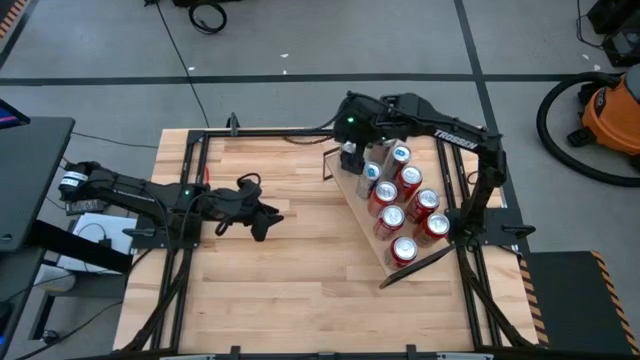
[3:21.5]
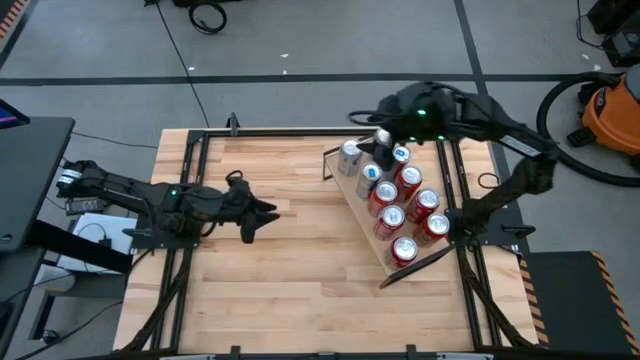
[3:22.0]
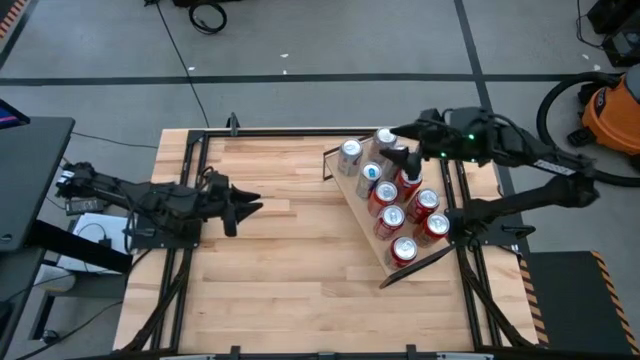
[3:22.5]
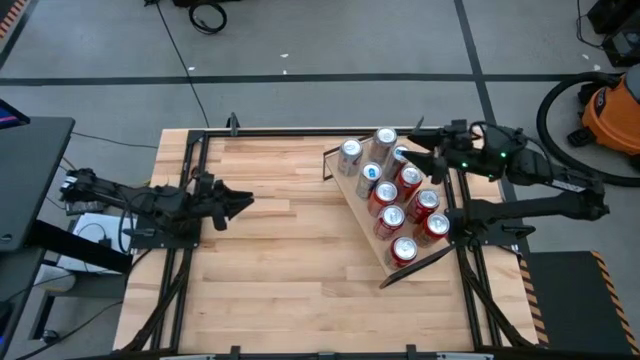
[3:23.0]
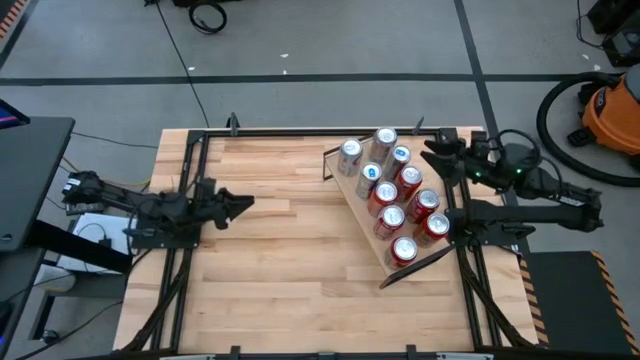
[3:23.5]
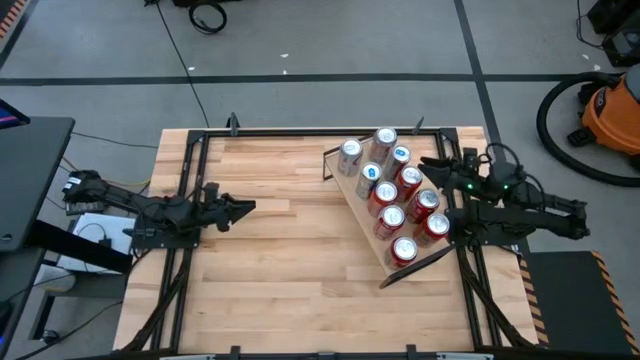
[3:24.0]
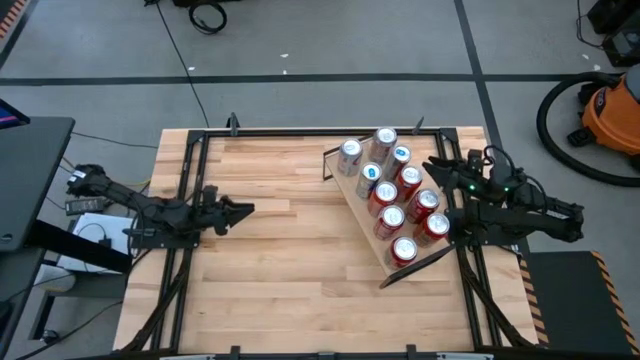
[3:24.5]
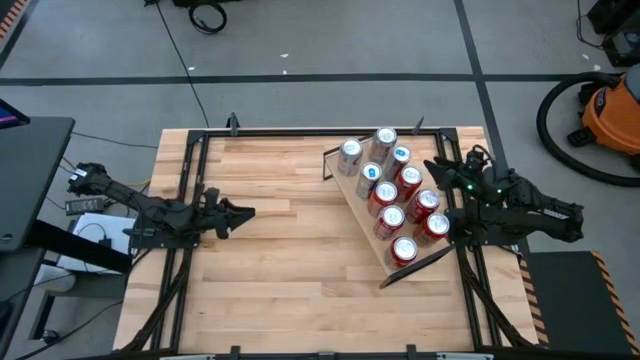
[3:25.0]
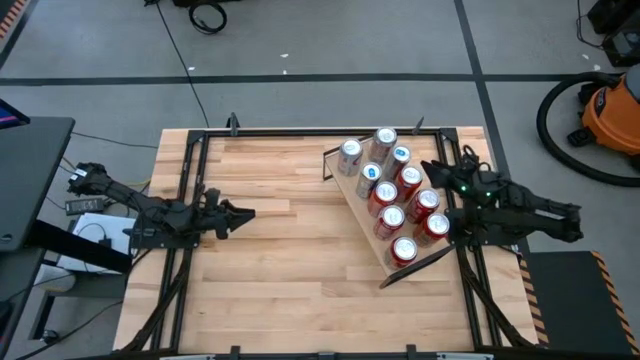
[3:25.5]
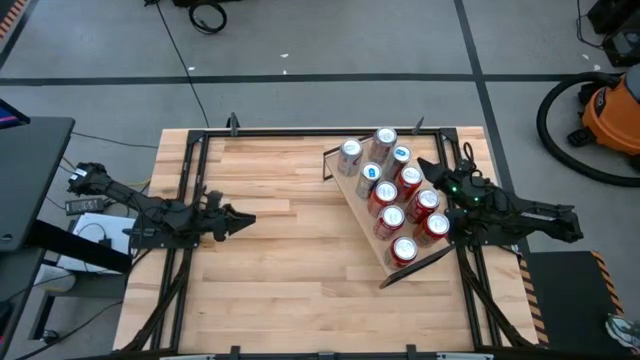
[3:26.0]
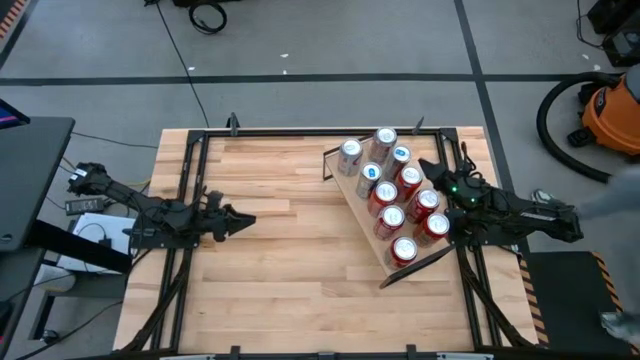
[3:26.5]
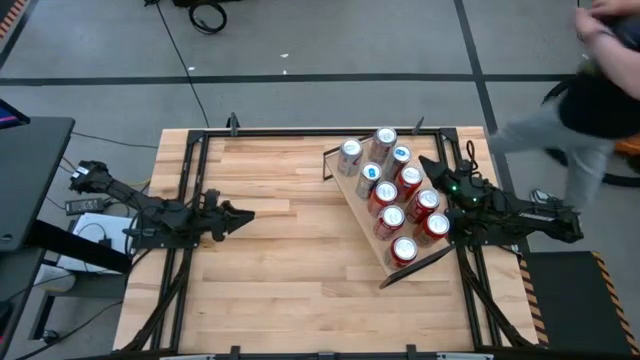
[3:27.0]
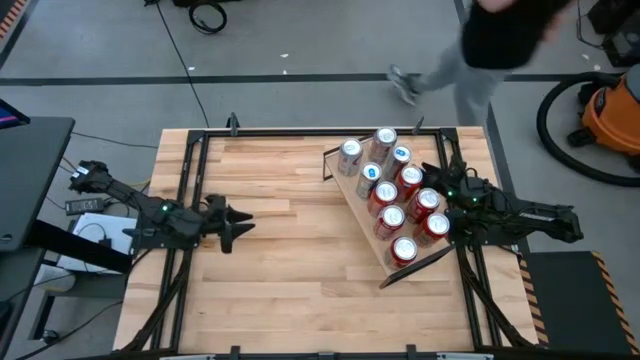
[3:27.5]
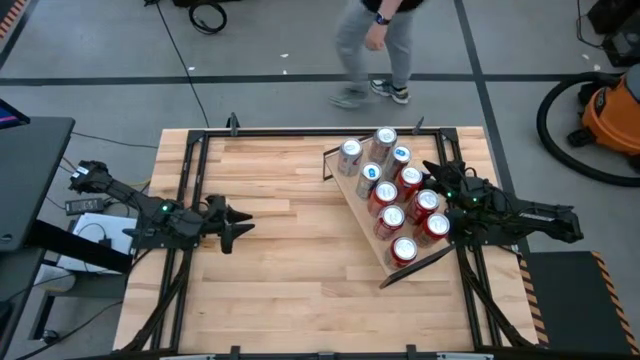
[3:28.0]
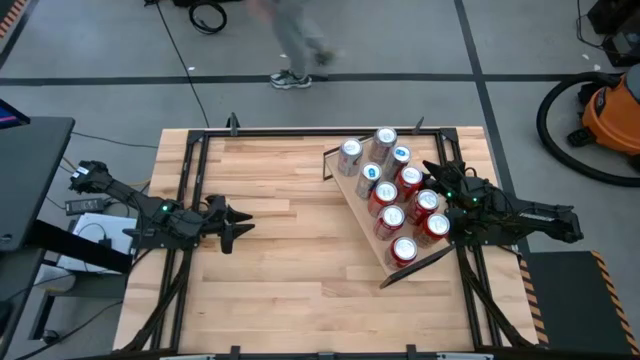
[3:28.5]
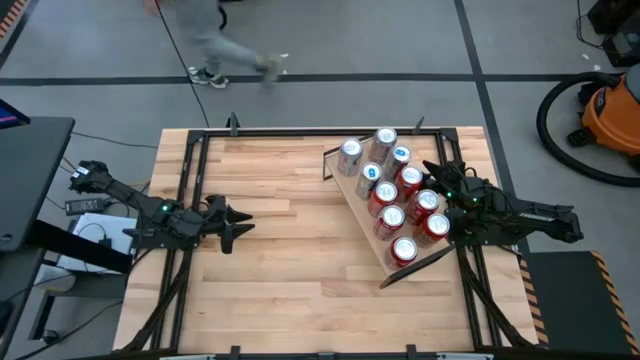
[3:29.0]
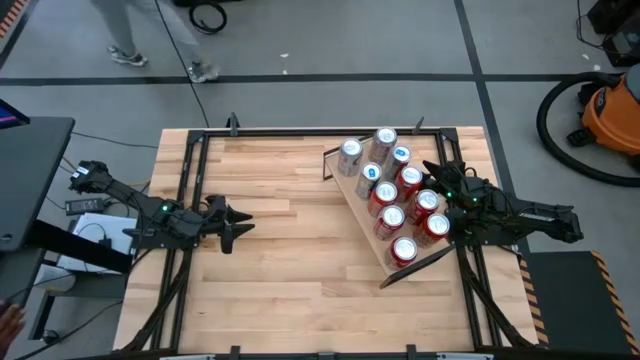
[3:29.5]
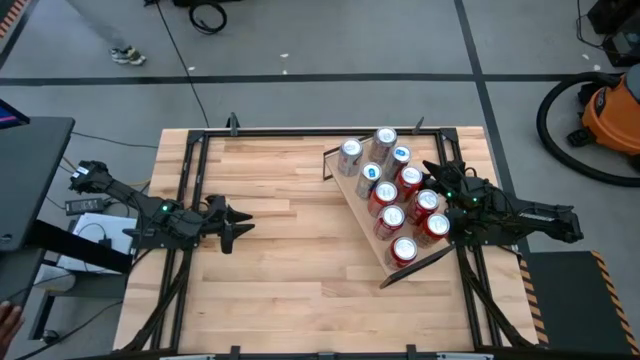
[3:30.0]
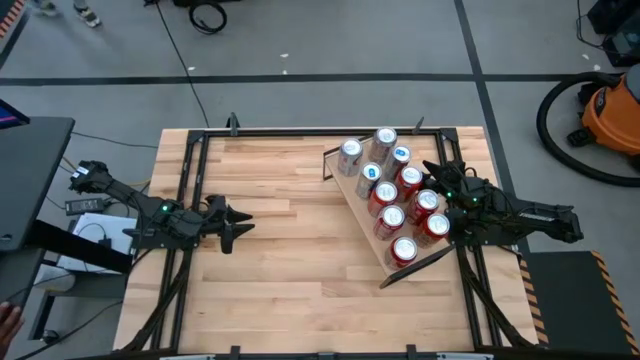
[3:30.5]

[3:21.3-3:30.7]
Task: Place canned beverage on shelf
Return to Home Position

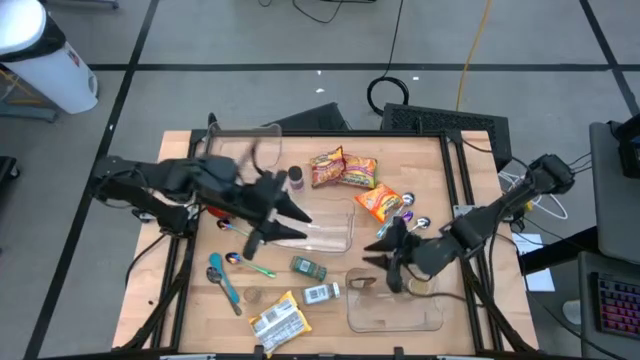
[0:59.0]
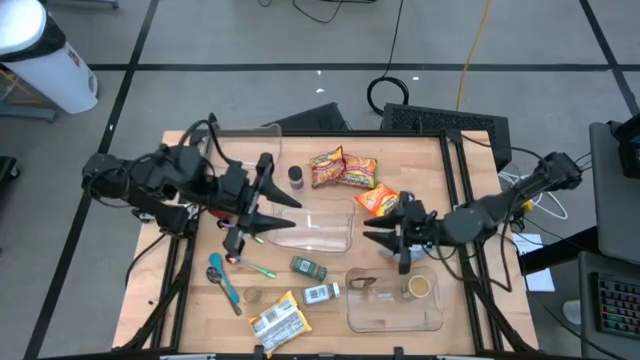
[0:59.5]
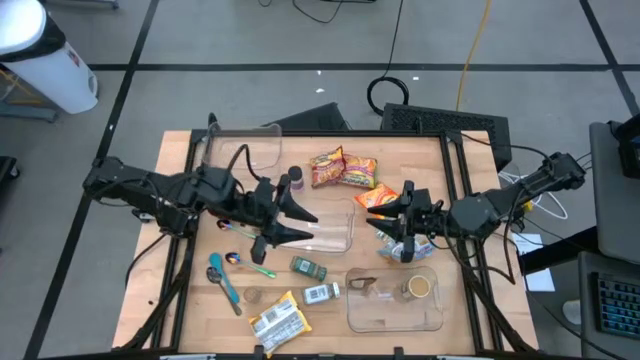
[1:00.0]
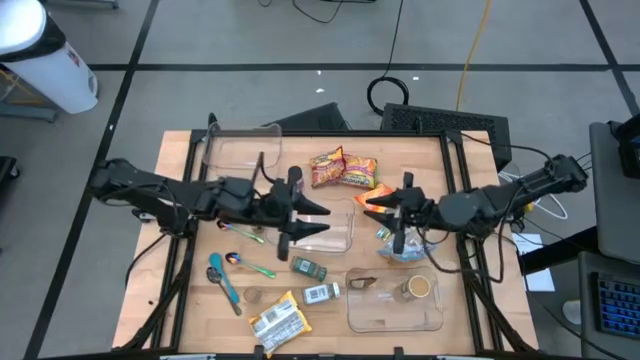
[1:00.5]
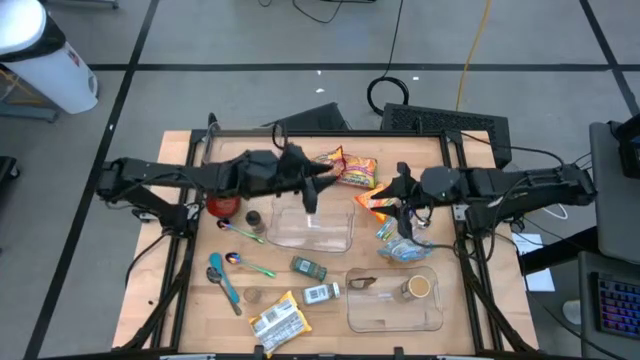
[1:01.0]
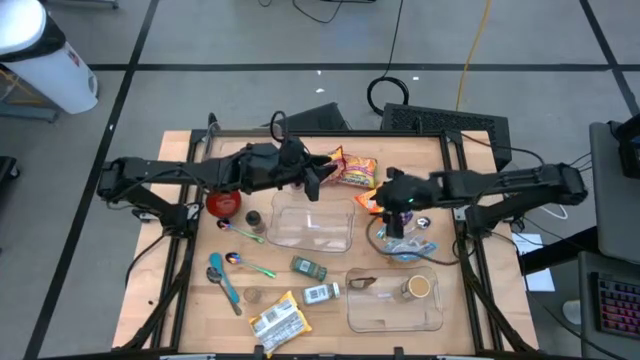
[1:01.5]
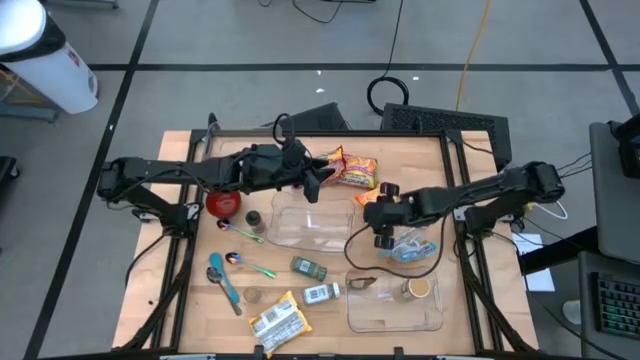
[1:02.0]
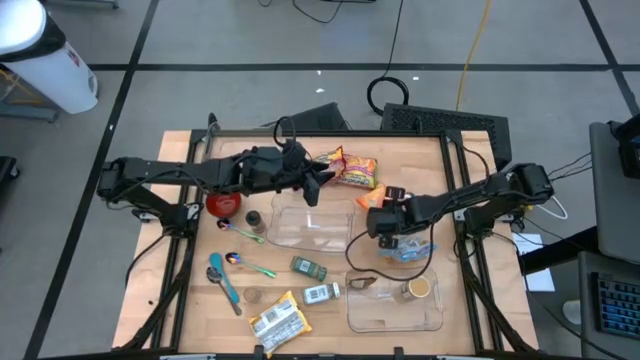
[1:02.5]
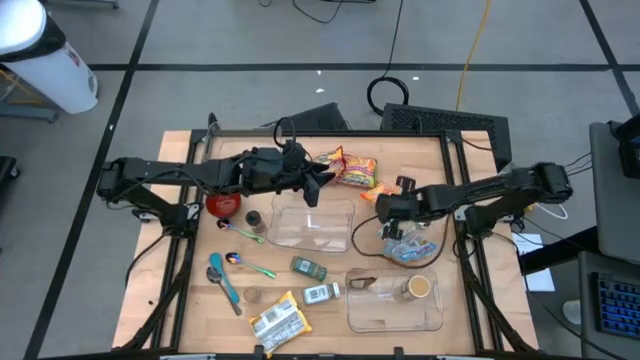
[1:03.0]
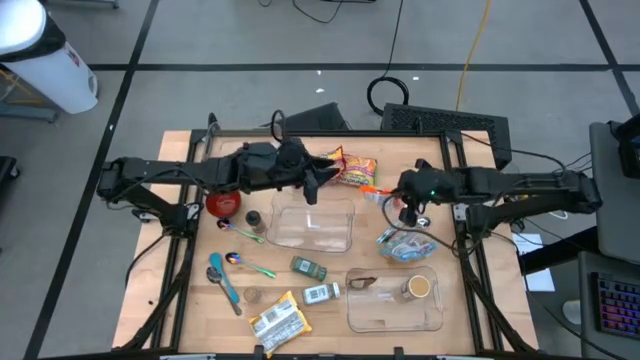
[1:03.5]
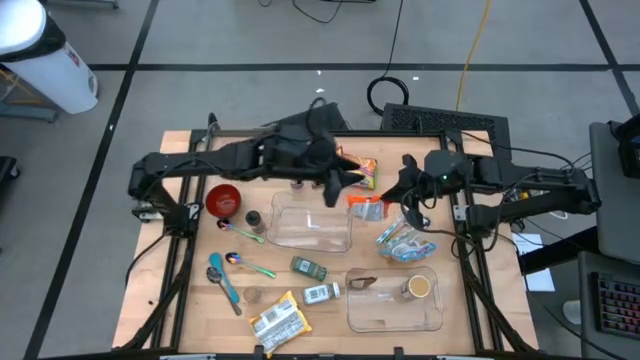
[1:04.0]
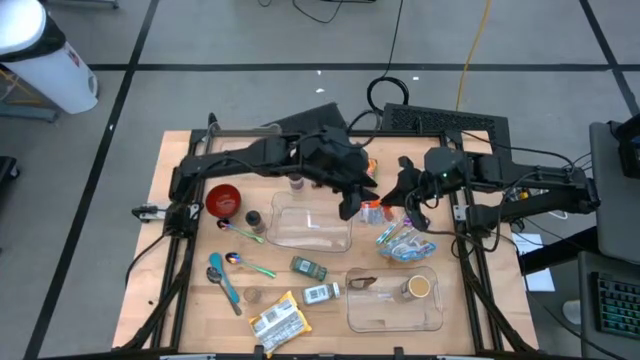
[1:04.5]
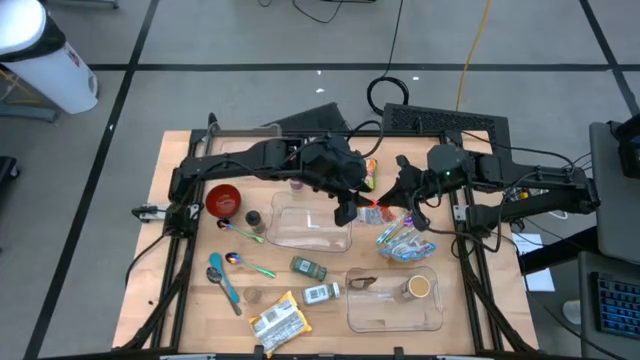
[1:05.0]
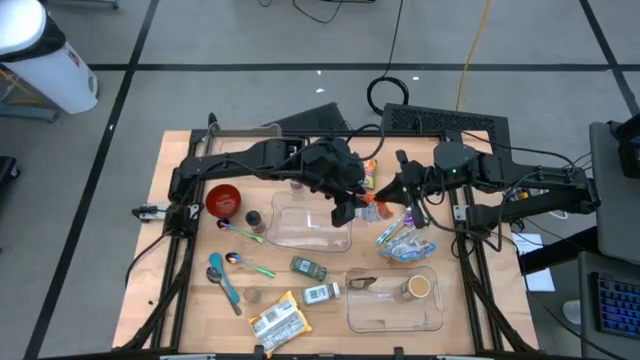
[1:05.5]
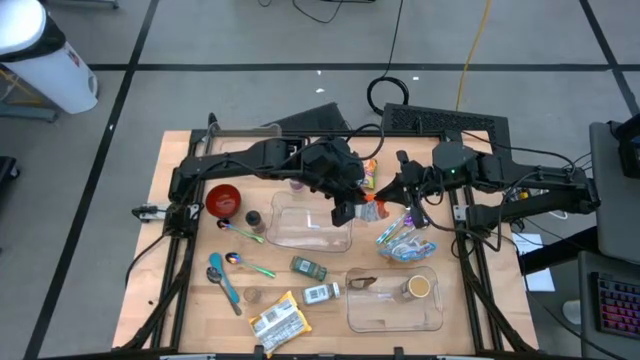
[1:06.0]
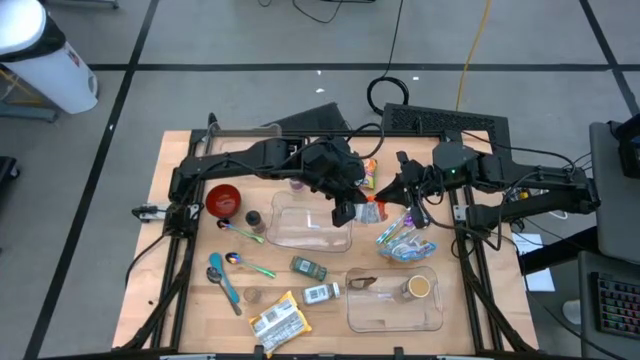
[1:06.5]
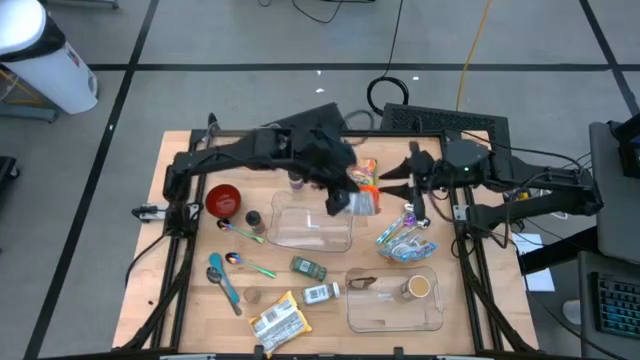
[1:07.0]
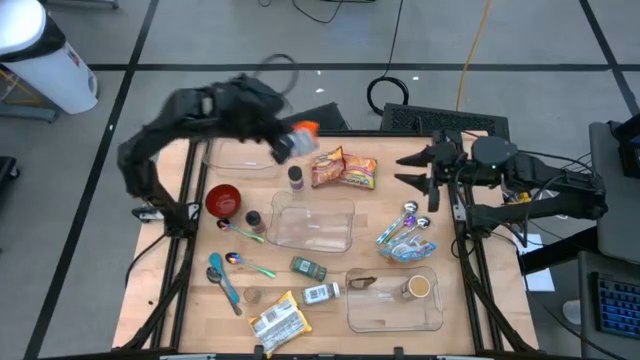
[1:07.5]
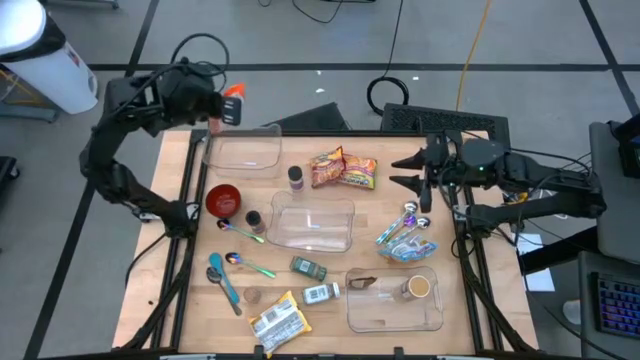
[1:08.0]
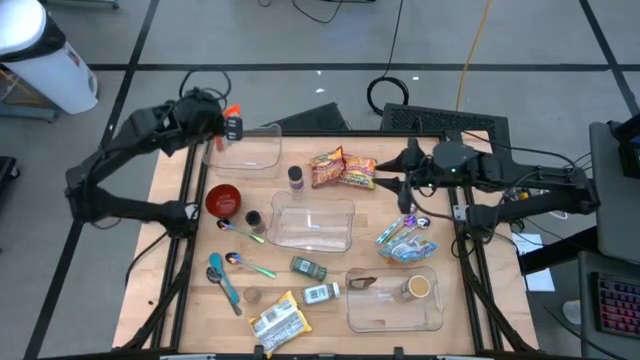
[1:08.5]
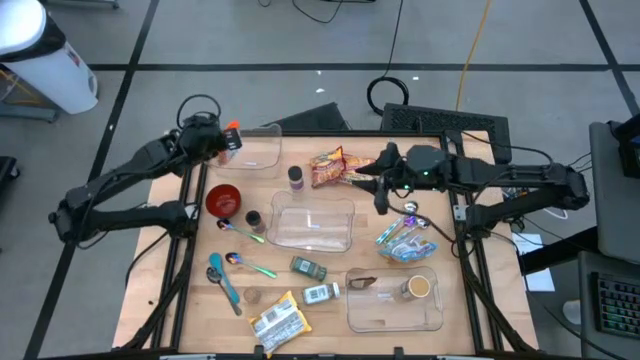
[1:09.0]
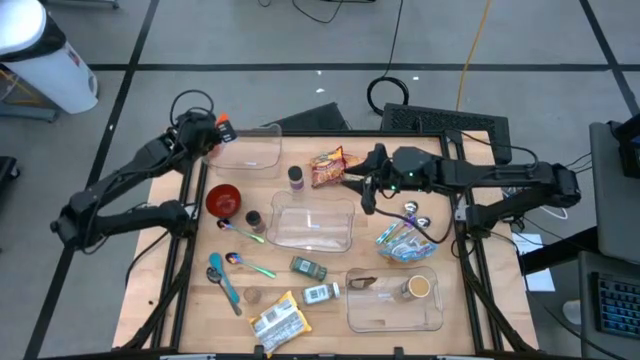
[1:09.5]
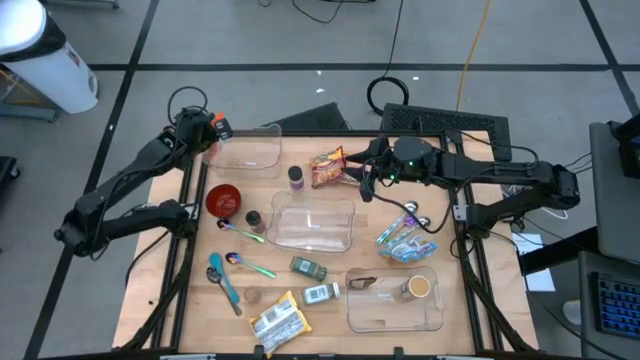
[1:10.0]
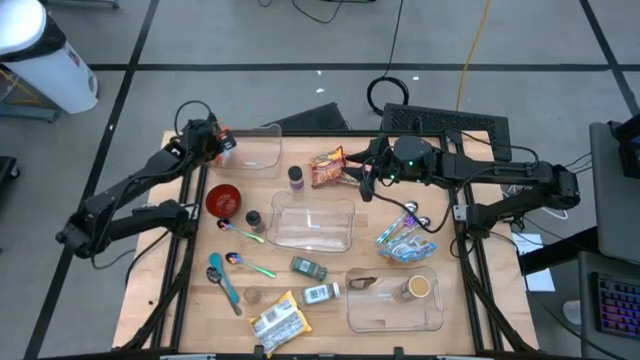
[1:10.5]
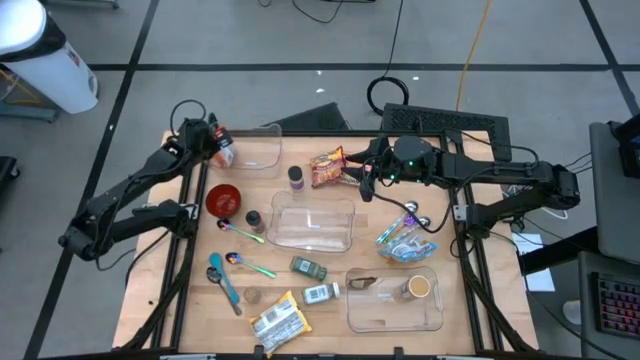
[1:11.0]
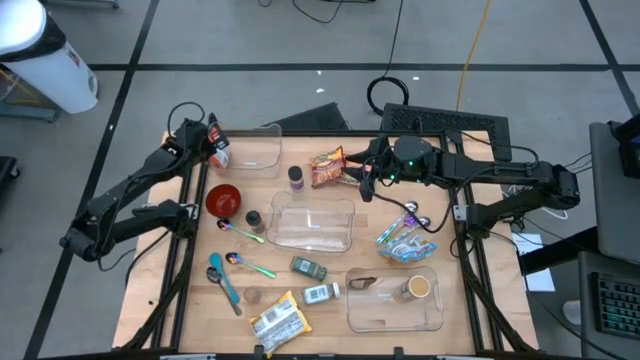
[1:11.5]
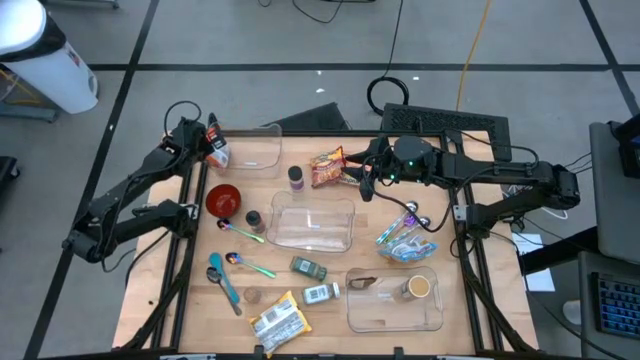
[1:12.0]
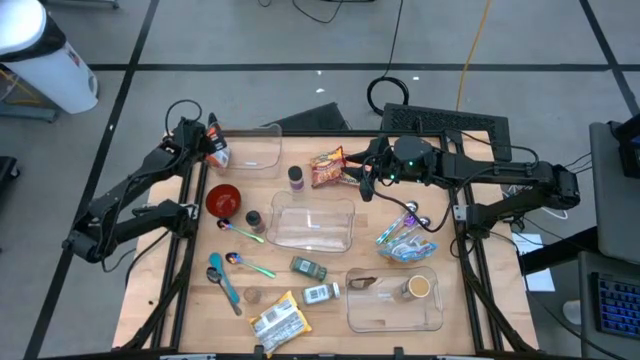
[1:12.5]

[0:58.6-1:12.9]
Task: Pick & Place Food Item
Put the orange noodle pack into the top transparent bin
